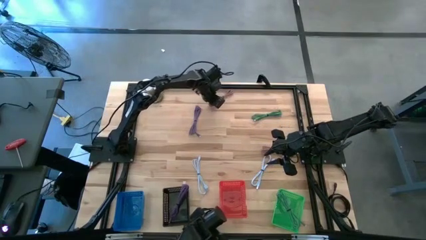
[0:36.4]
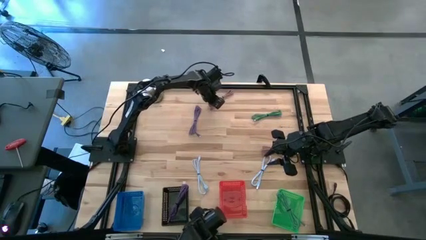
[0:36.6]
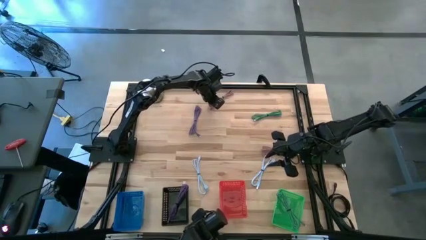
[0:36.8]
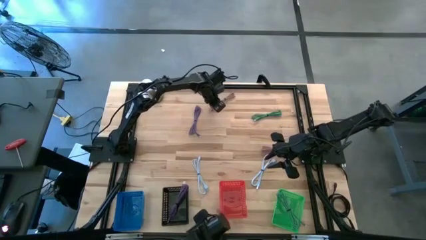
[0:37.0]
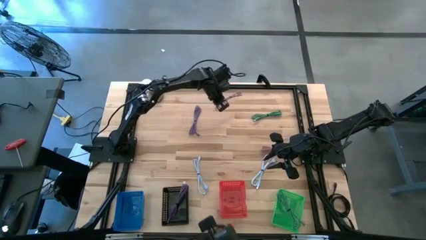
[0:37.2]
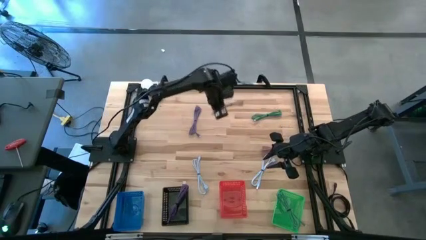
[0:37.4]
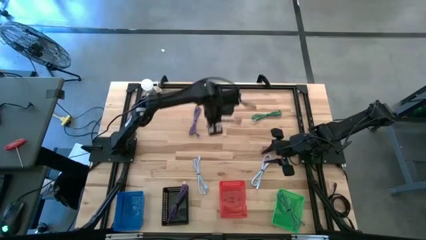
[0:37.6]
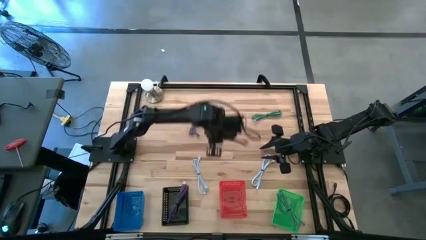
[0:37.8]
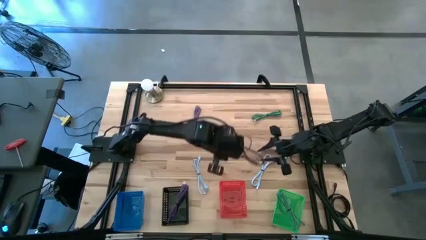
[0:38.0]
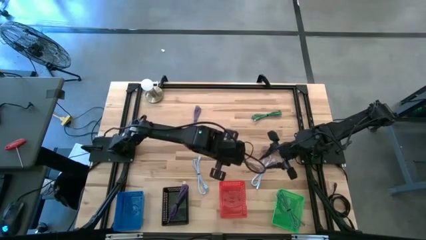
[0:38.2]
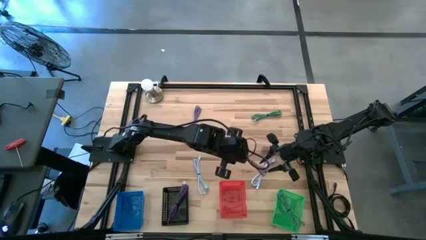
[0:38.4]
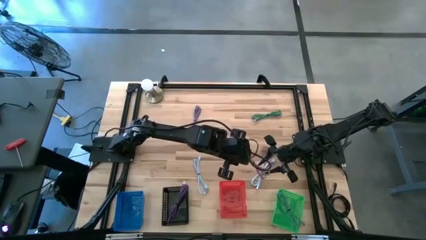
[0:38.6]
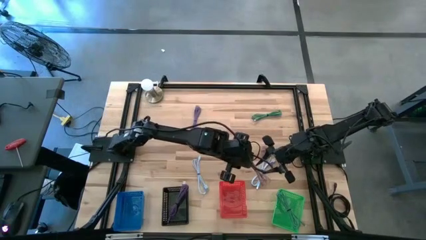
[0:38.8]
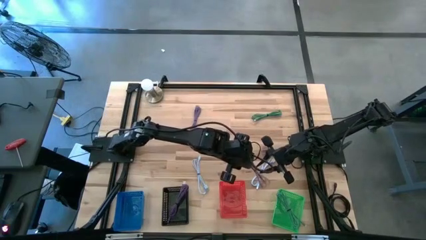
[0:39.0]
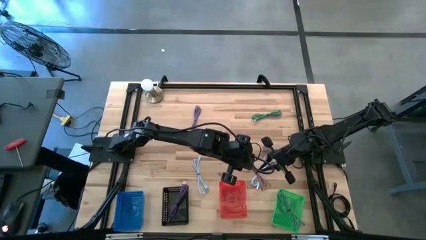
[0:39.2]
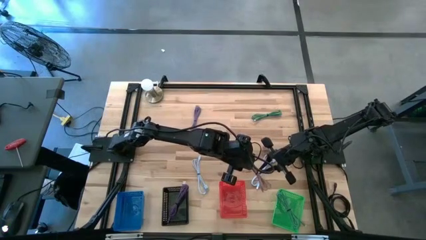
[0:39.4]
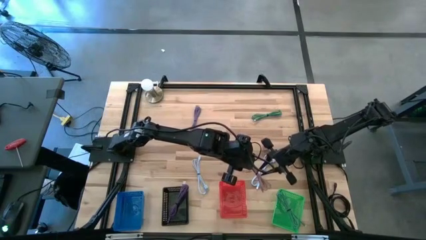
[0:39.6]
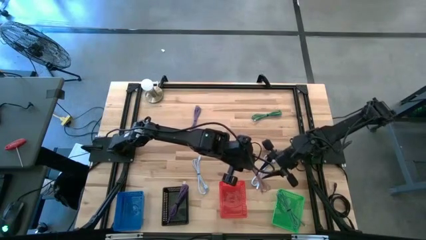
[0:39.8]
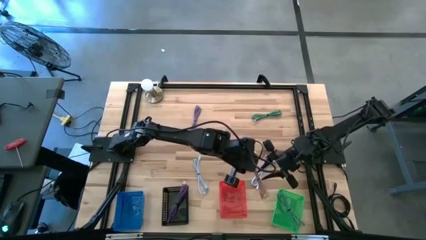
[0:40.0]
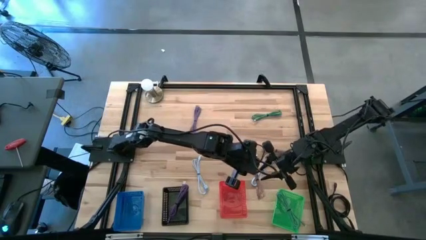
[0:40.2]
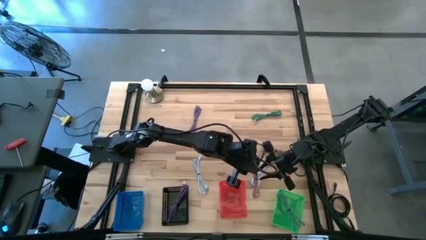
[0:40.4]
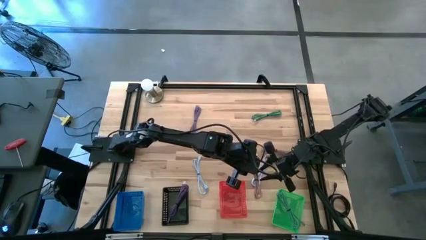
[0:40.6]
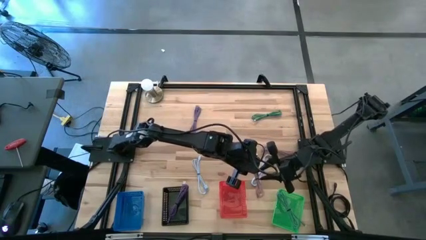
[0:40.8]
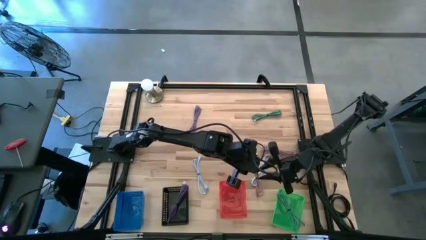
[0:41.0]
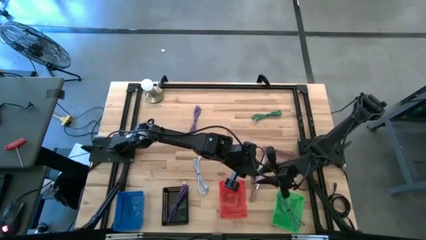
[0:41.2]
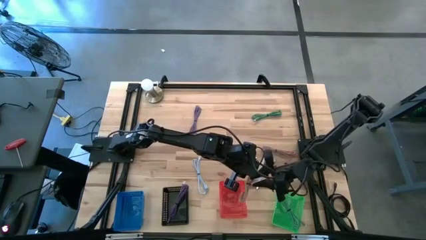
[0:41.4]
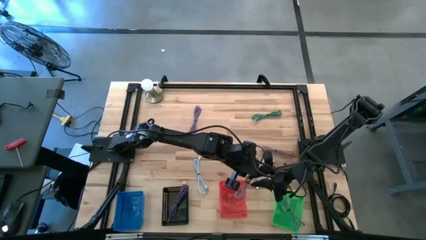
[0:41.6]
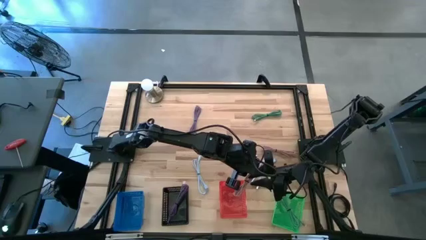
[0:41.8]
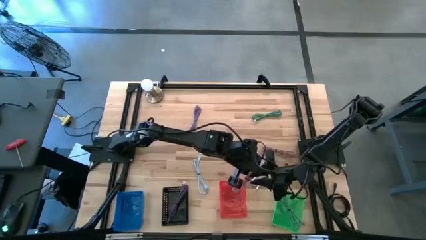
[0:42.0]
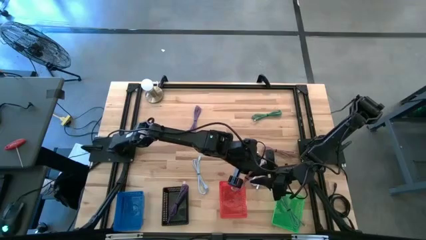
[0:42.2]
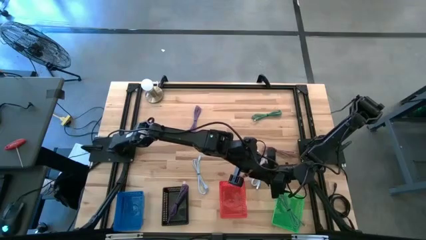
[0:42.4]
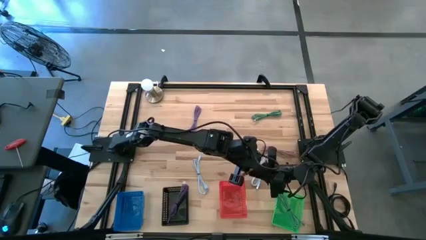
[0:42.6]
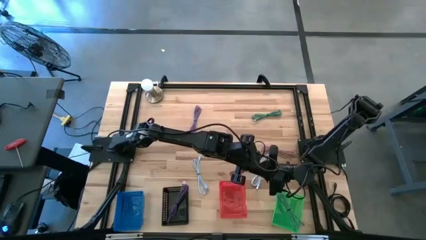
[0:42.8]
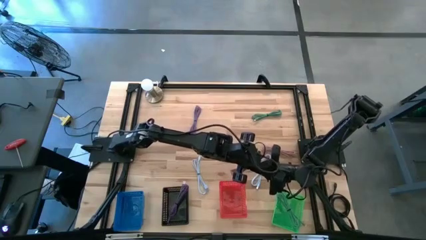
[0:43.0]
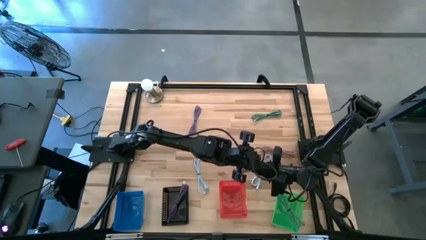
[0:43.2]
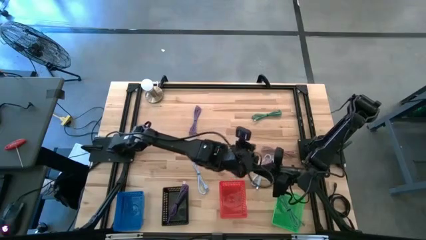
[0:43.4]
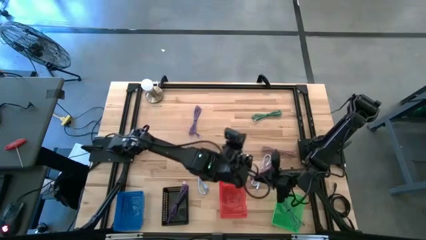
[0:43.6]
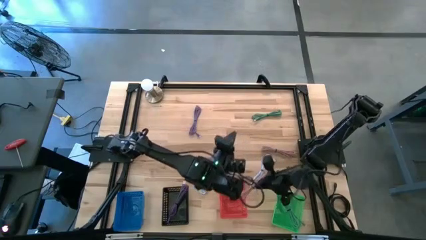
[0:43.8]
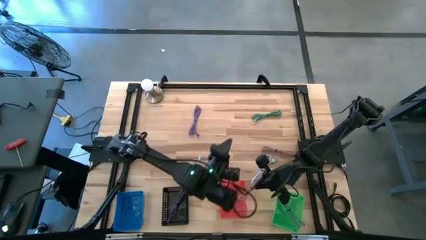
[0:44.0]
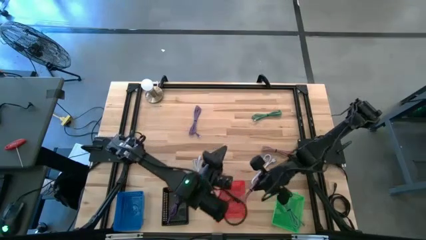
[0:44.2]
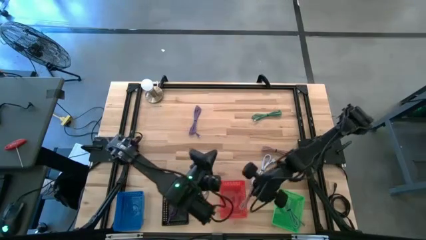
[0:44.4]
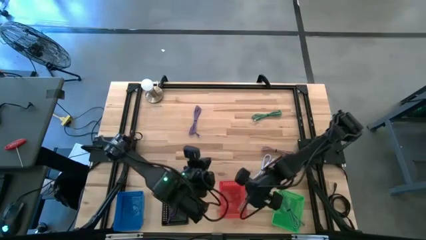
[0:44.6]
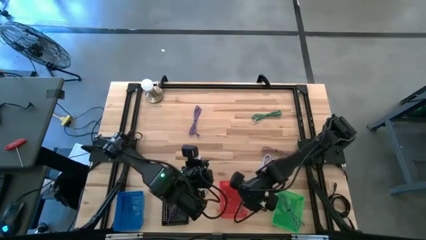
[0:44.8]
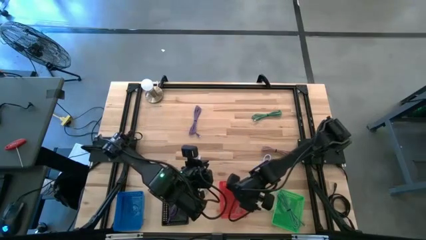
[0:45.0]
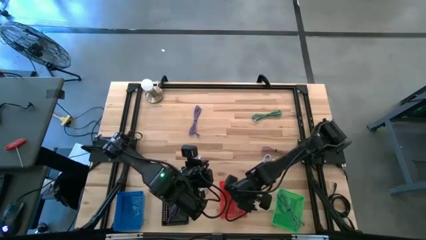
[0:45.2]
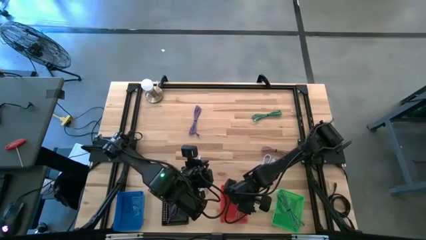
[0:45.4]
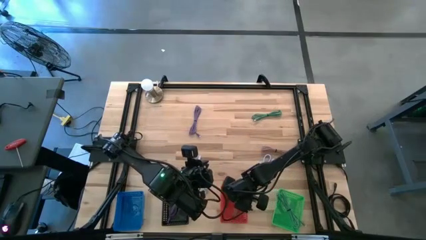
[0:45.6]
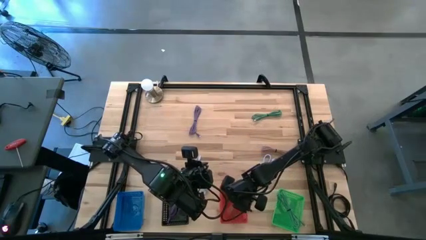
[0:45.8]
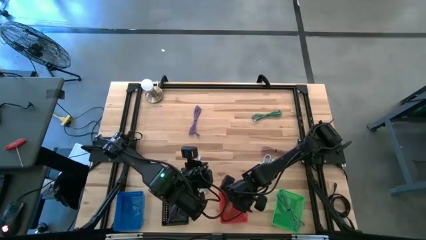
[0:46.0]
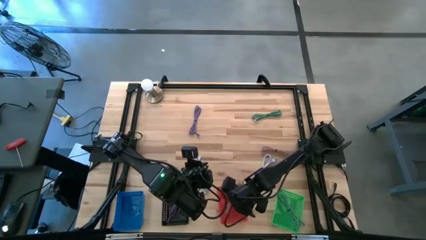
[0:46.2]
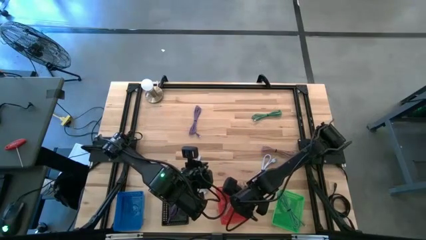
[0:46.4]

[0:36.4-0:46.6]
Task: Pick & Place USB Port
Put the top pink charger cable into the red bin

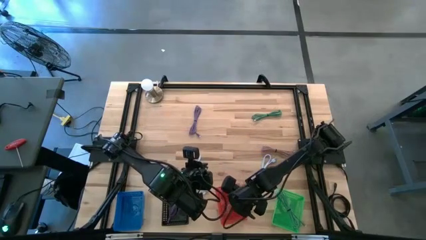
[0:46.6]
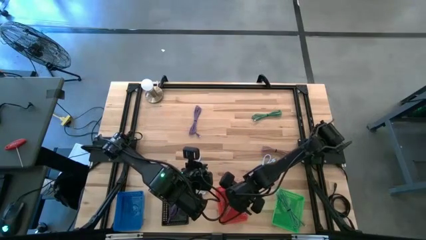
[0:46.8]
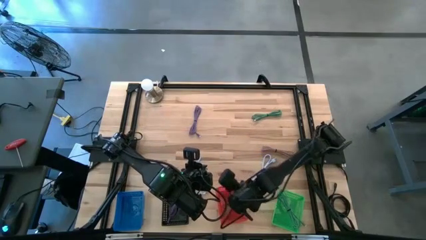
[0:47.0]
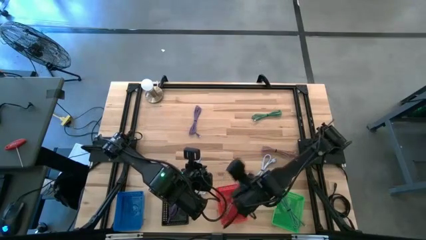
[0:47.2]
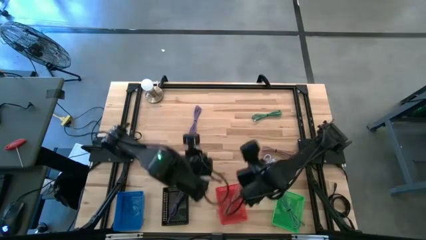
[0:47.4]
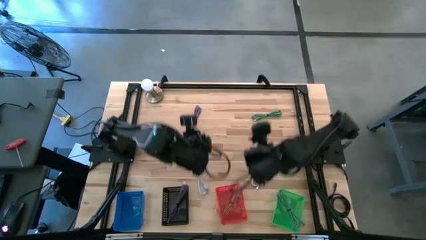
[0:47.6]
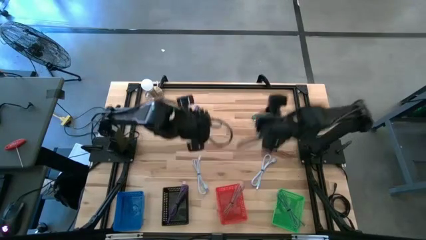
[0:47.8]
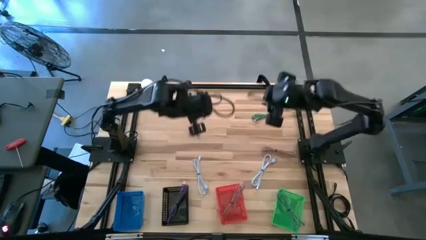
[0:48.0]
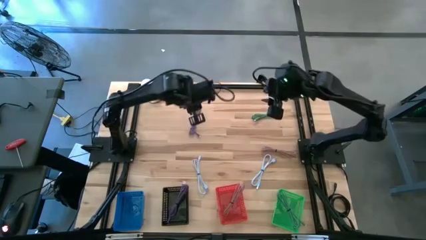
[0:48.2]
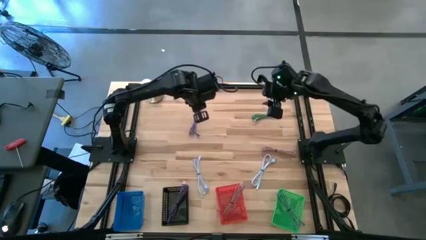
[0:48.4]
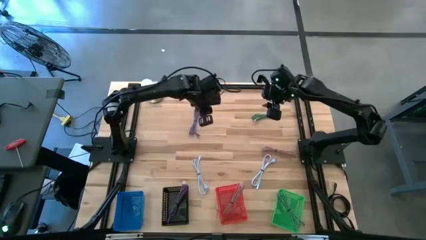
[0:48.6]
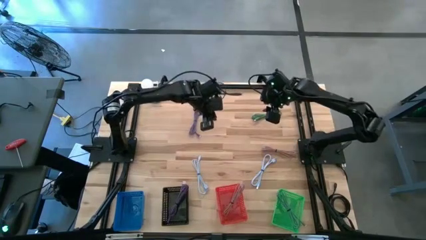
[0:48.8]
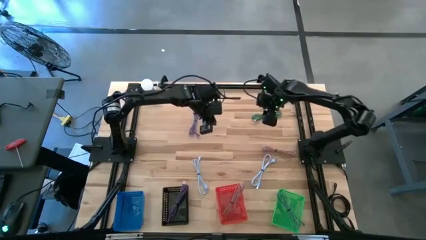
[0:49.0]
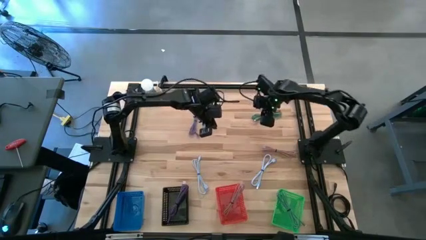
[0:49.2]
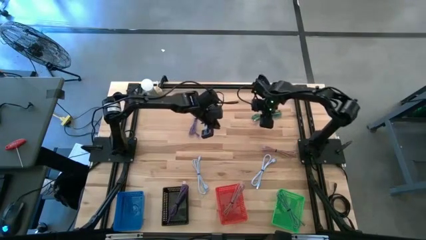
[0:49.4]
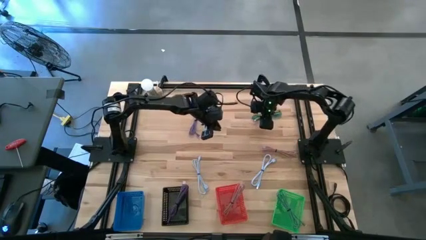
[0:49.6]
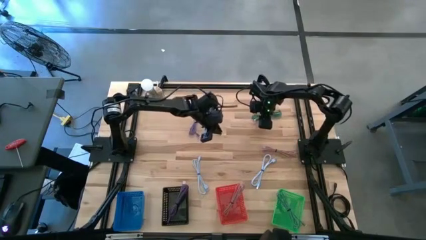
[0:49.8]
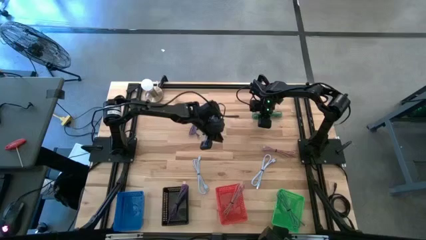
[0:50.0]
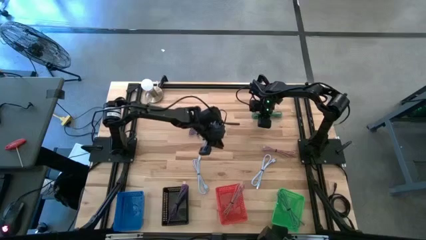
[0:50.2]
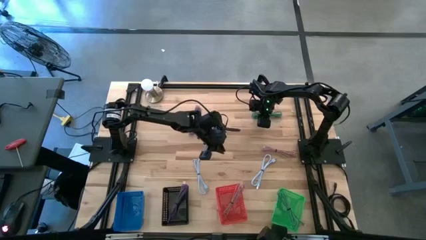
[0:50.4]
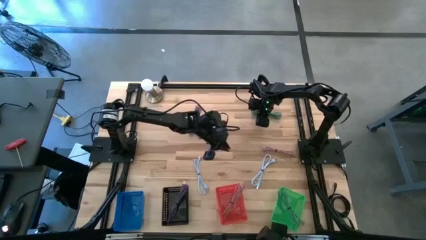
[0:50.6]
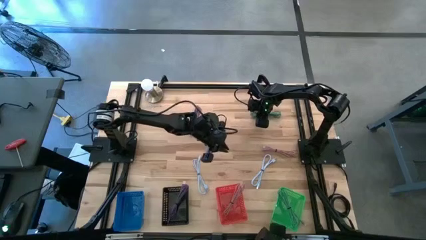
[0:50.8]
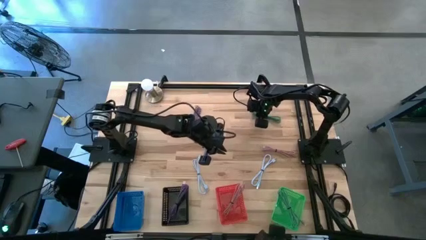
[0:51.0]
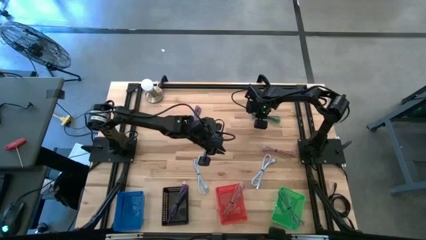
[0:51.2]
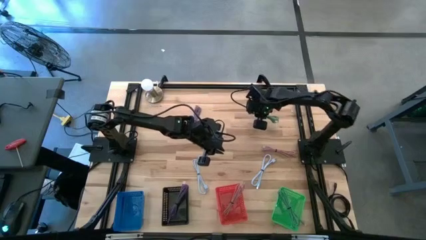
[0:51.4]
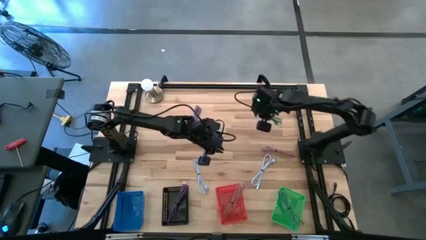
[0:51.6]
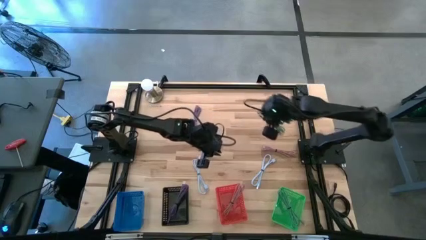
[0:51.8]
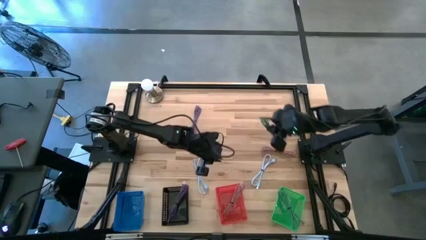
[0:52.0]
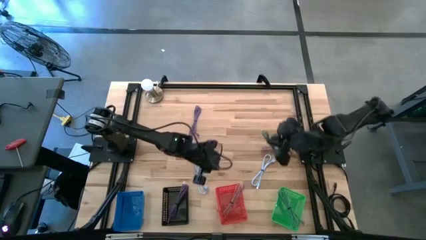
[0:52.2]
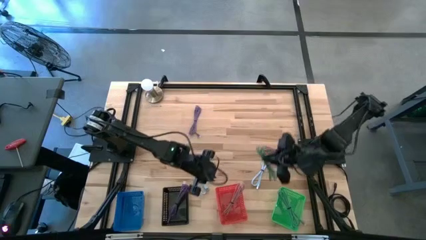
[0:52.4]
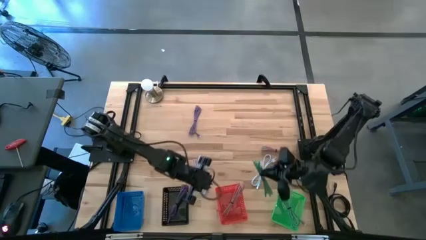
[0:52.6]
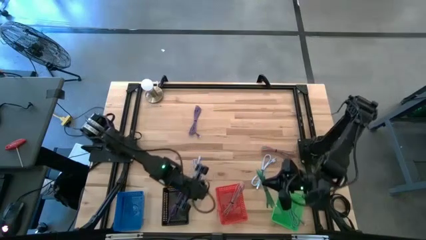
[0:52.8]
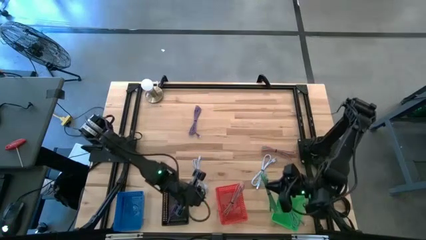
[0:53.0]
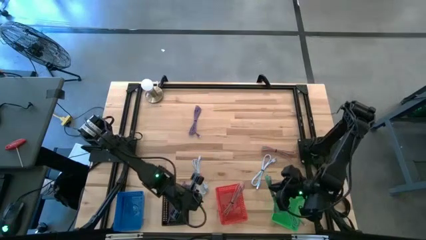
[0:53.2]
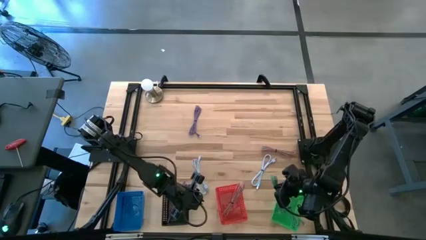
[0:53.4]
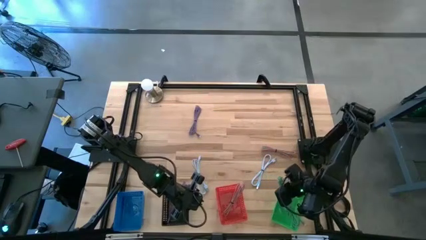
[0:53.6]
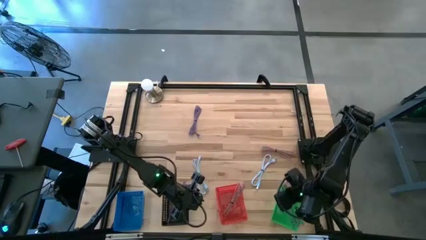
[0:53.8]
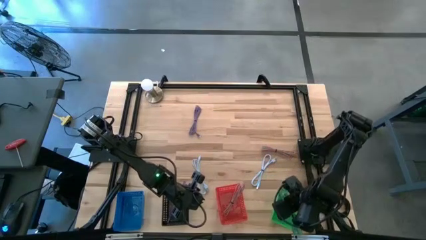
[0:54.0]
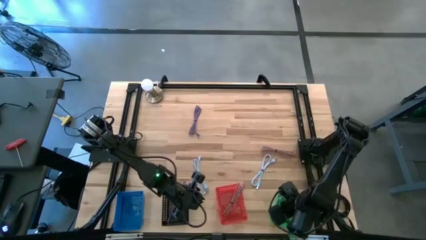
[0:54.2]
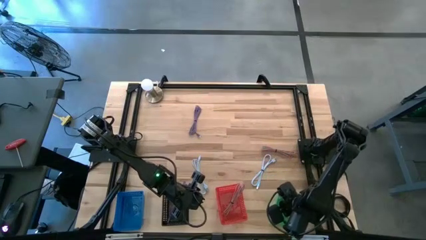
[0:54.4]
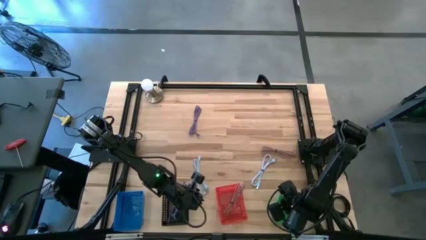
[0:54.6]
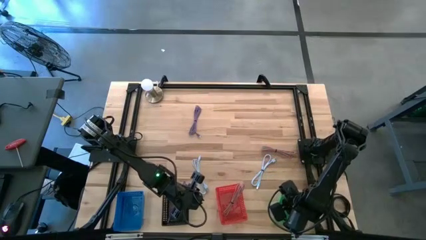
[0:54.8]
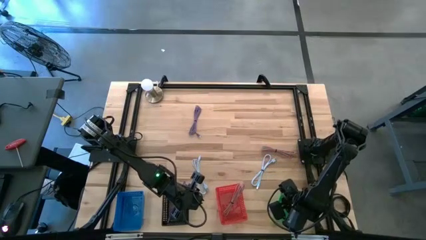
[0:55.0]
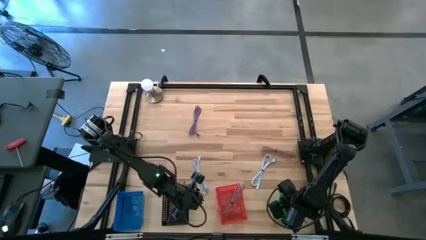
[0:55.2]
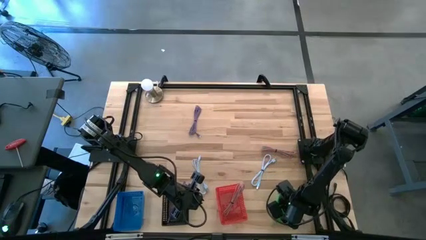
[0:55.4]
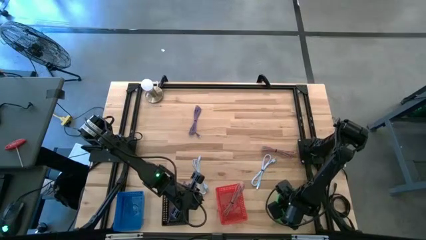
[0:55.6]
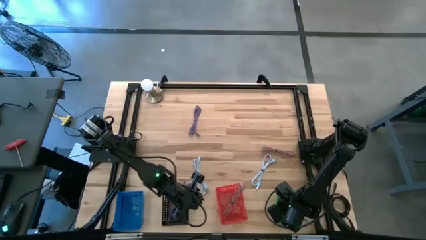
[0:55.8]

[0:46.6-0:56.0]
Put the green charger cable into the green bin
